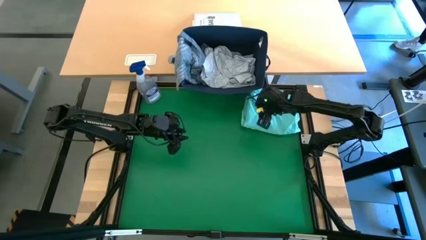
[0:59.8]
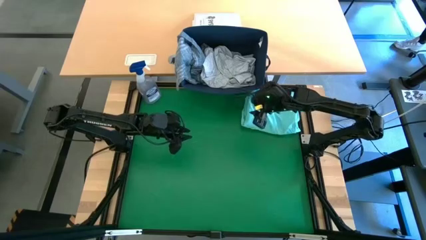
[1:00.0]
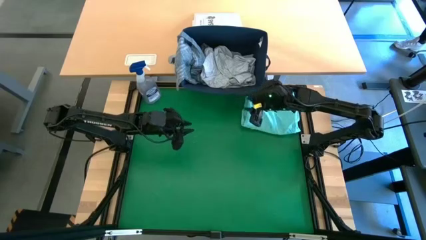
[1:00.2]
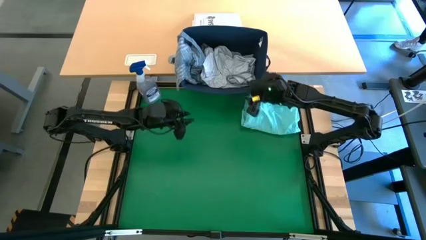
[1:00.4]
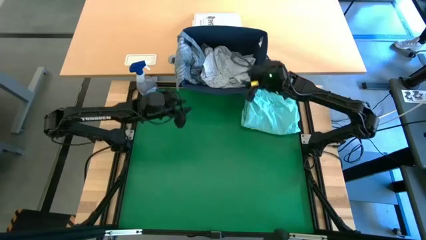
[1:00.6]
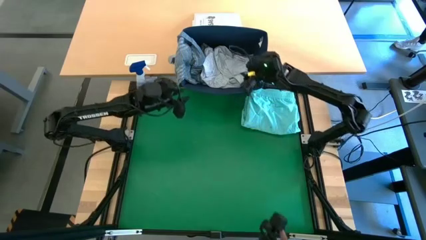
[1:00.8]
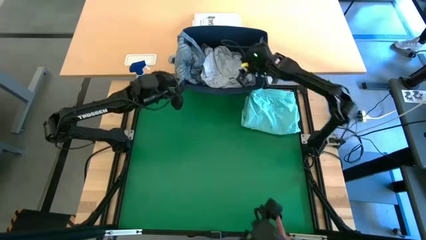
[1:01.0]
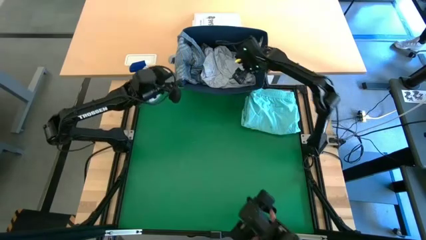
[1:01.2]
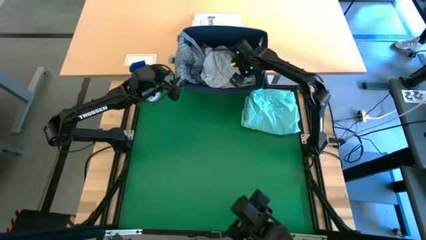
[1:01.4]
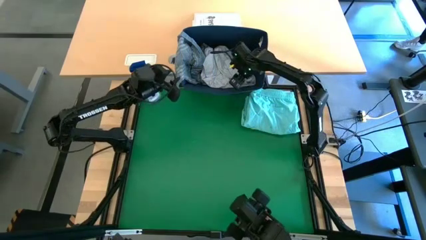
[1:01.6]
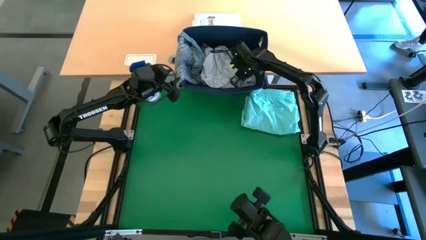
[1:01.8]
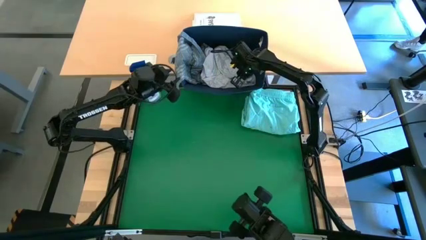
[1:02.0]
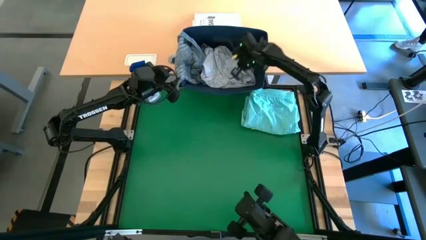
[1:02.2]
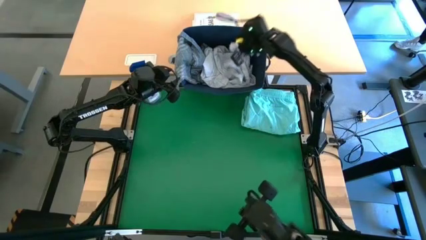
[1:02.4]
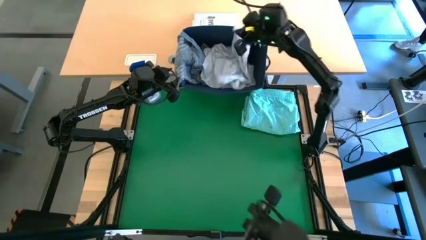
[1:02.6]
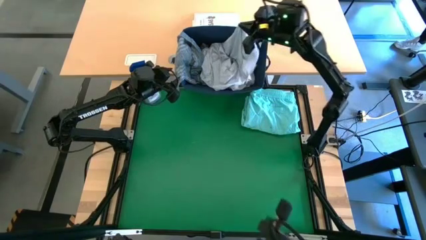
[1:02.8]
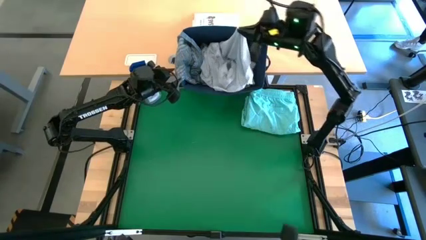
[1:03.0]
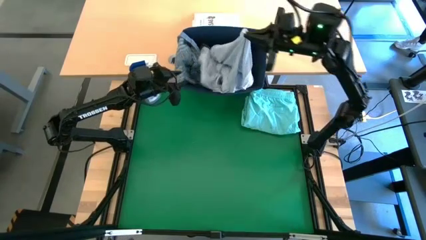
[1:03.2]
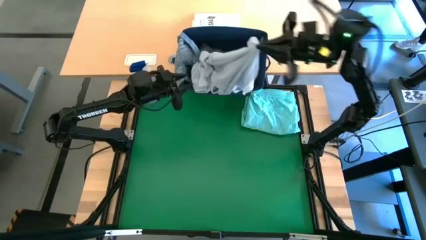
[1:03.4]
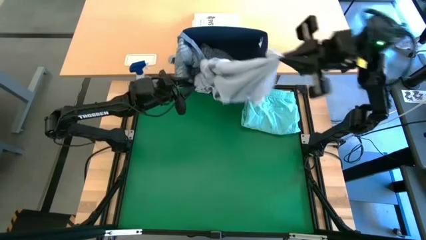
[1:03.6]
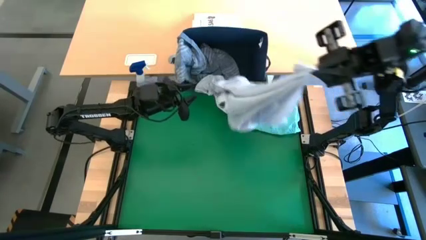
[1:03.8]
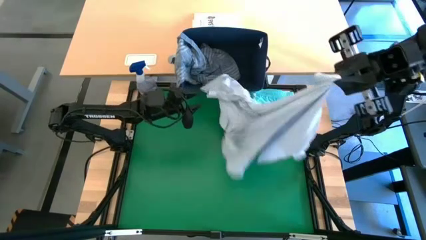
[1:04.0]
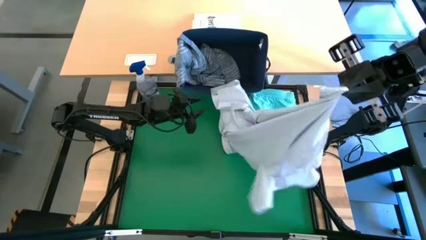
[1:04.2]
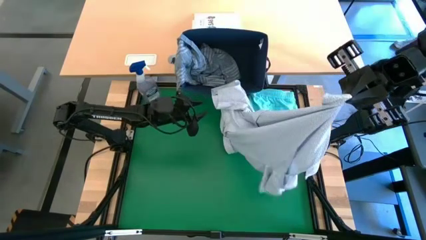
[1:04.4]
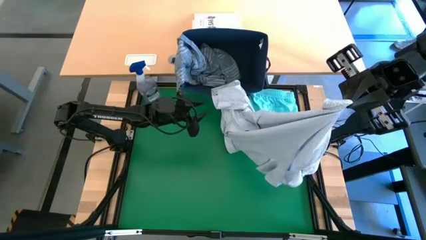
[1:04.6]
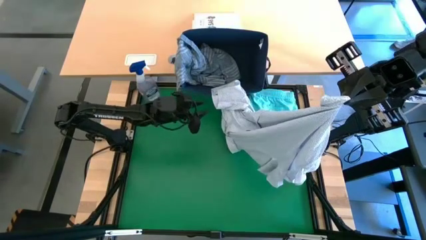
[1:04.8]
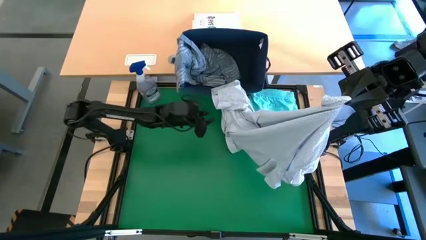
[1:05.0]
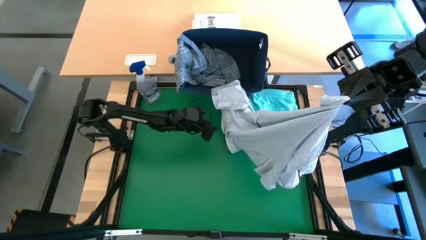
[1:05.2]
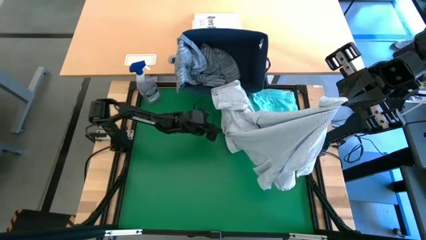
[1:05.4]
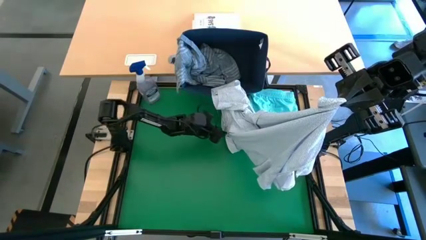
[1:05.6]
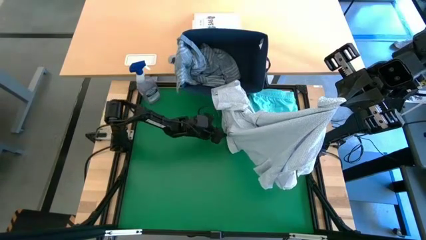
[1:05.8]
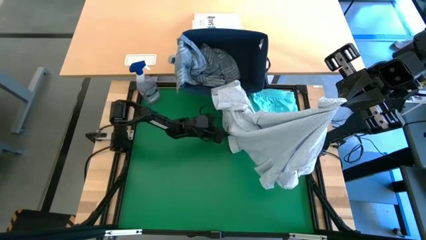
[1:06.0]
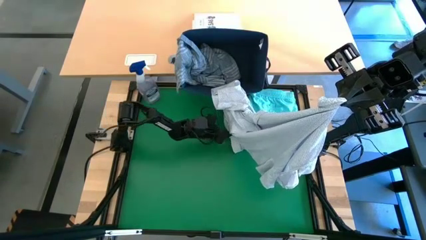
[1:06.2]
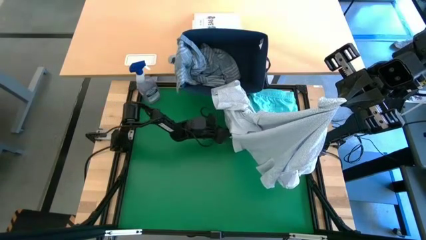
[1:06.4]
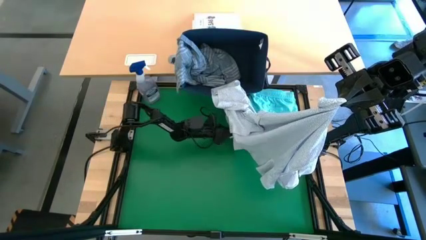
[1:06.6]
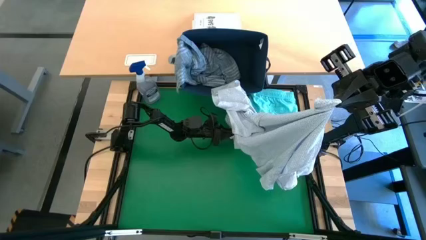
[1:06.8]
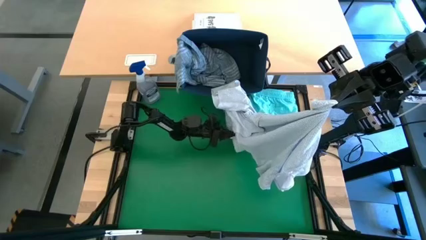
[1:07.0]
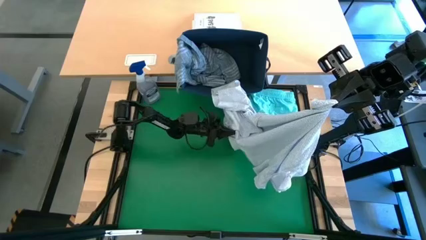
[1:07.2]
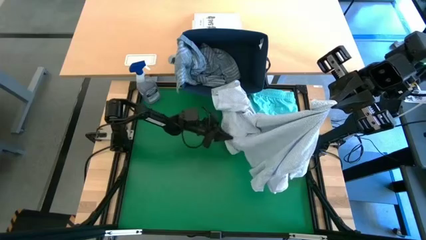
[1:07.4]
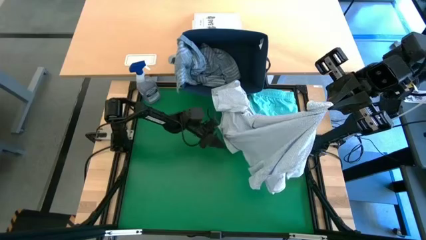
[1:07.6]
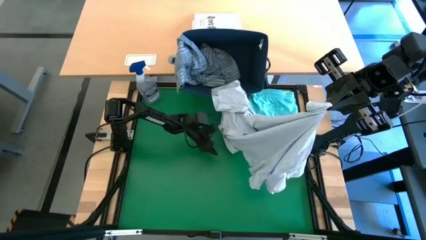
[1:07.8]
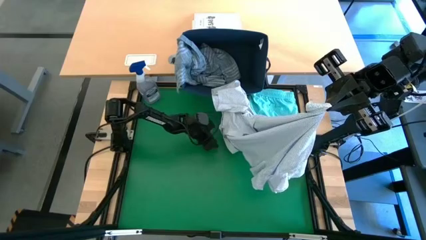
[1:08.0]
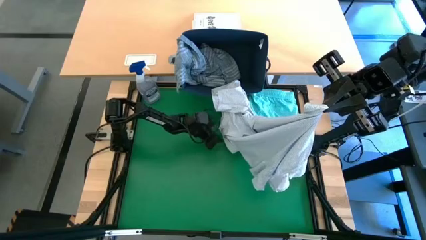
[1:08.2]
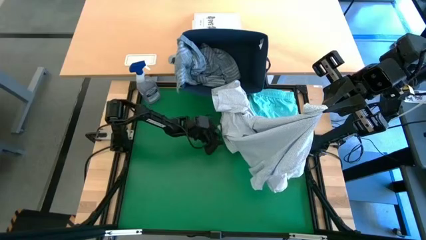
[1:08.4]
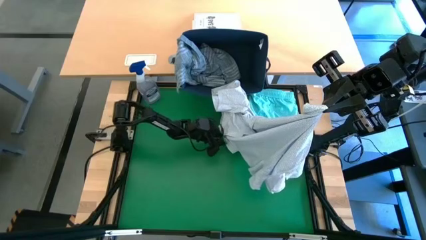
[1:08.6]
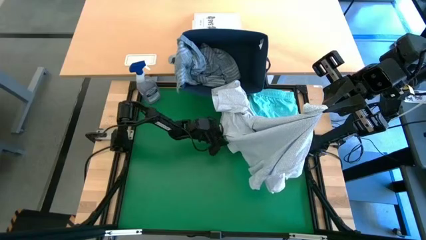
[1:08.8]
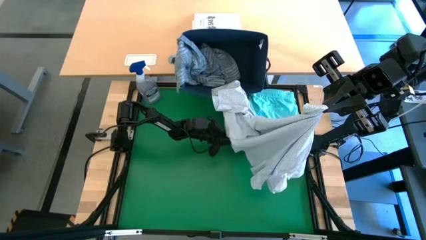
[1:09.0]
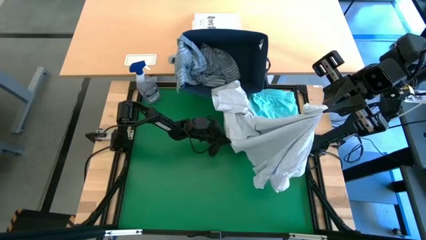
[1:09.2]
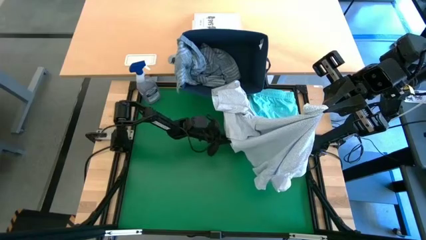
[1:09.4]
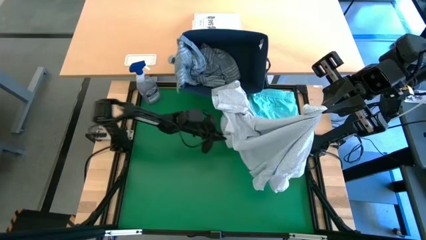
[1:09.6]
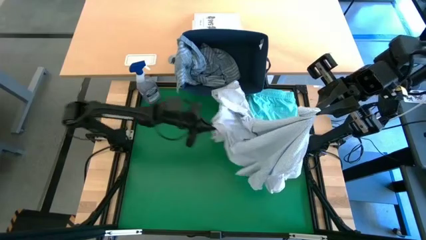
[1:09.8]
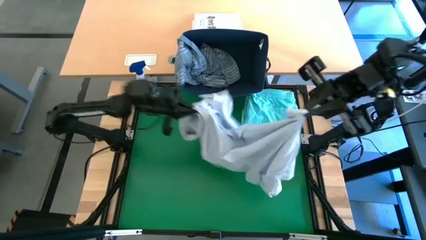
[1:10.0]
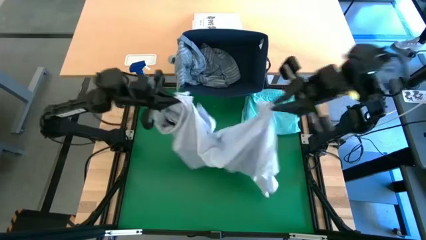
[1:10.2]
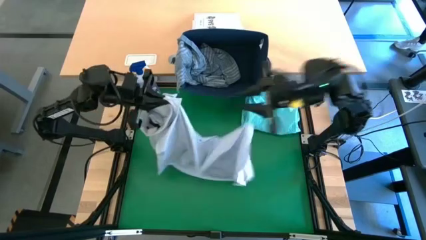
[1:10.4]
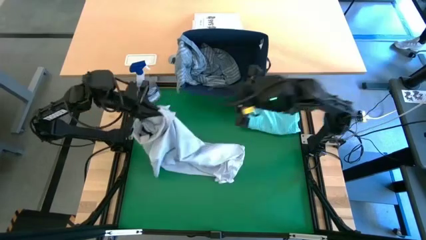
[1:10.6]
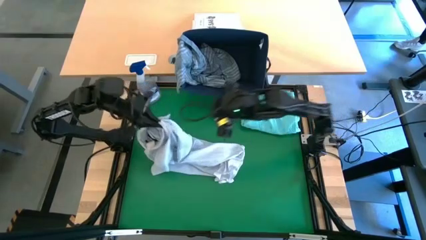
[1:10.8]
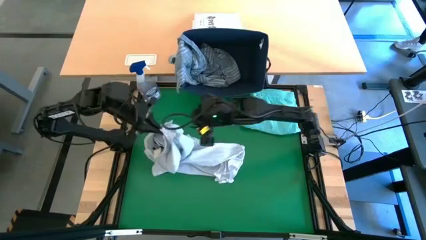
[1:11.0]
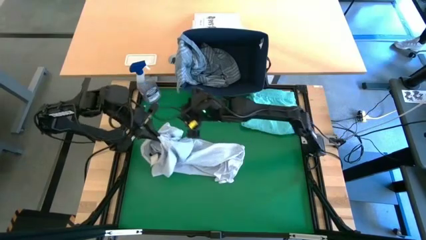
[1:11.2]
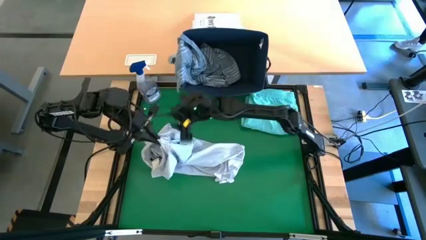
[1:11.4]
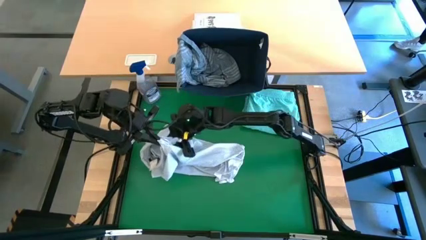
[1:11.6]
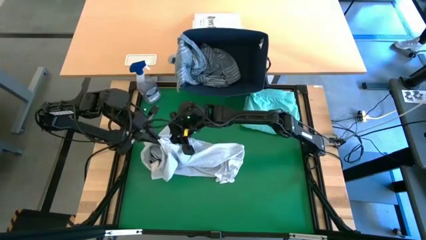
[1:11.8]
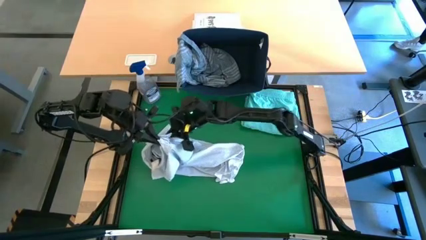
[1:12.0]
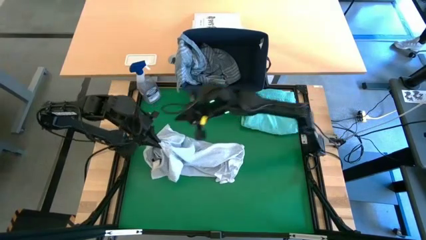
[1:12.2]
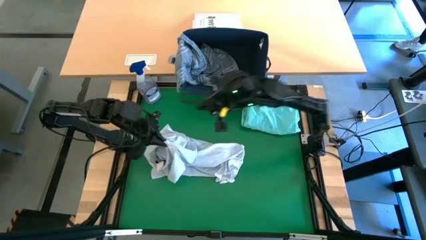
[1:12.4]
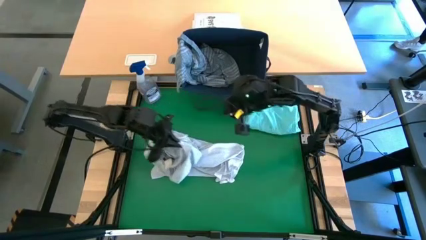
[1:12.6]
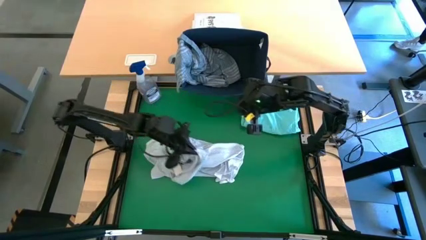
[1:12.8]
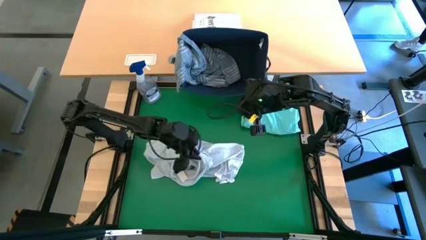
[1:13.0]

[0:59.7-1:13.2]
Task: Fold laundry
Remove the white polo shirt from the blue laundry bin

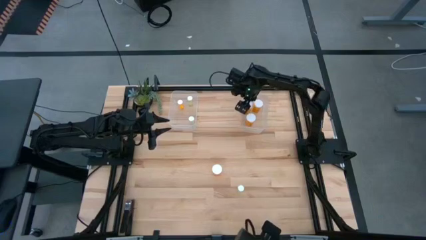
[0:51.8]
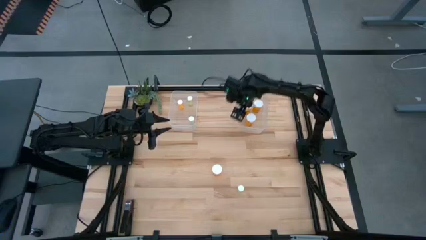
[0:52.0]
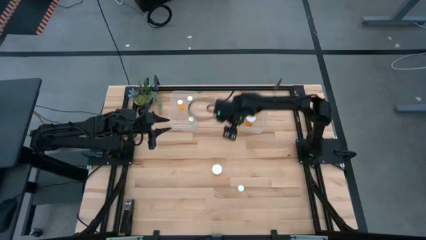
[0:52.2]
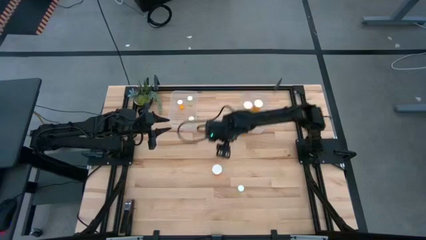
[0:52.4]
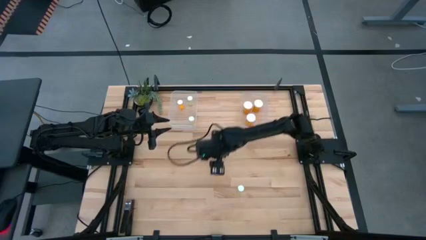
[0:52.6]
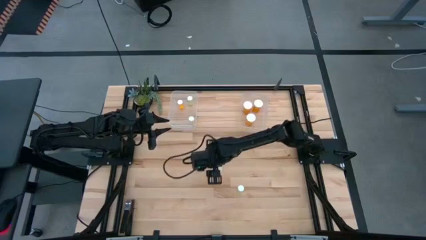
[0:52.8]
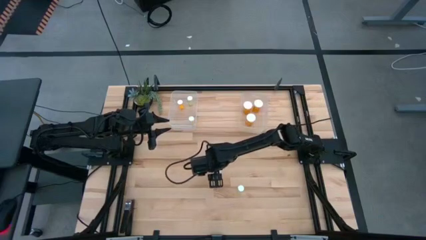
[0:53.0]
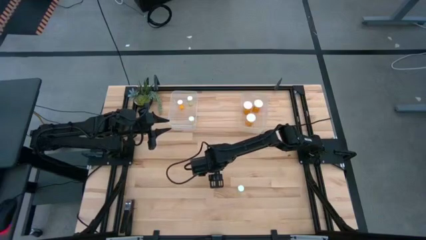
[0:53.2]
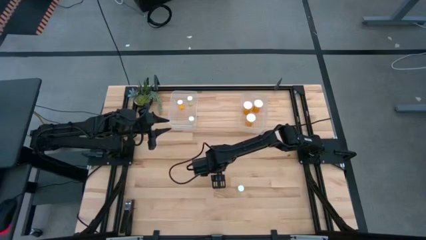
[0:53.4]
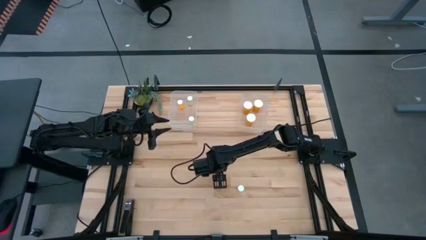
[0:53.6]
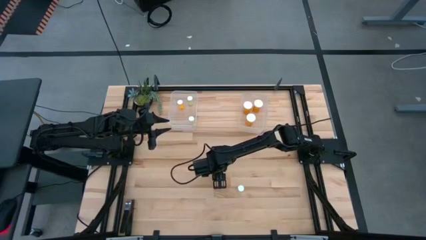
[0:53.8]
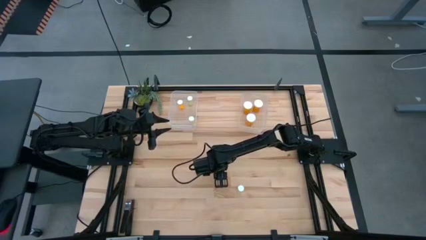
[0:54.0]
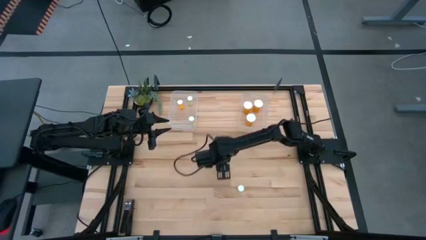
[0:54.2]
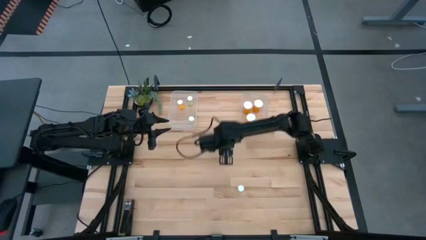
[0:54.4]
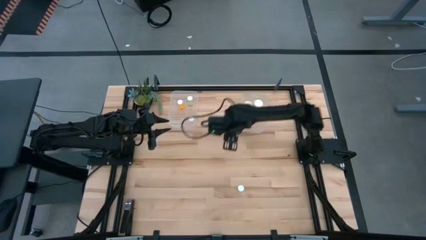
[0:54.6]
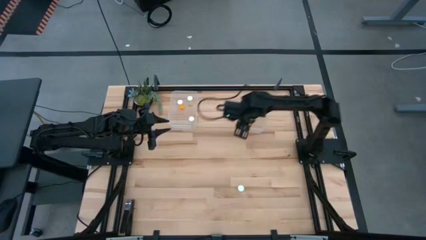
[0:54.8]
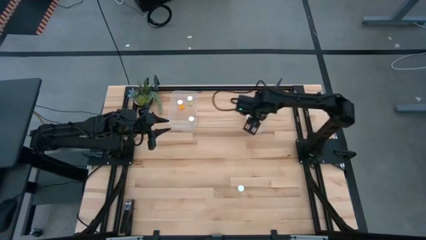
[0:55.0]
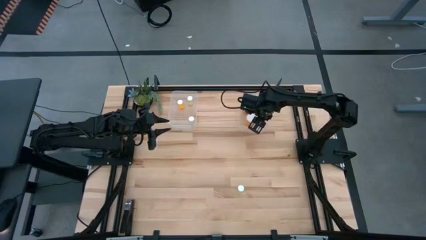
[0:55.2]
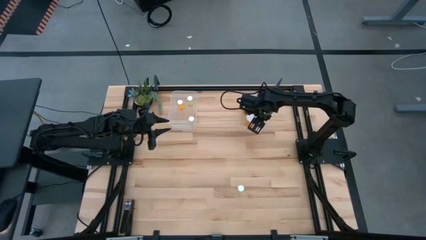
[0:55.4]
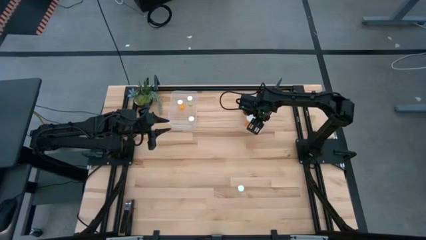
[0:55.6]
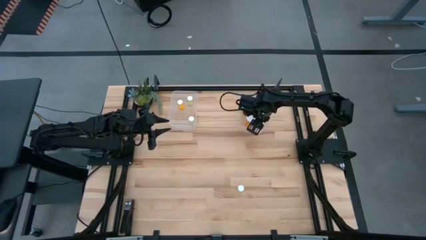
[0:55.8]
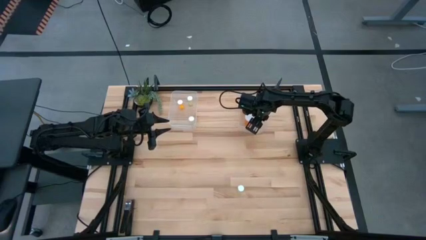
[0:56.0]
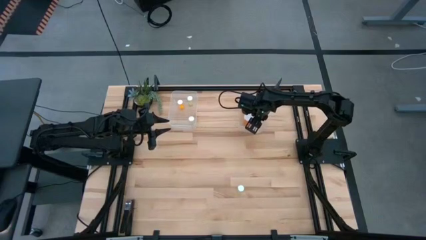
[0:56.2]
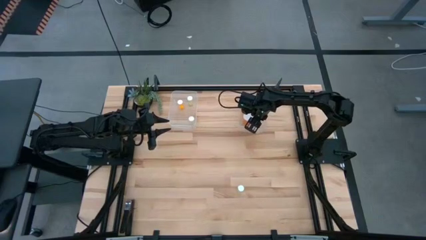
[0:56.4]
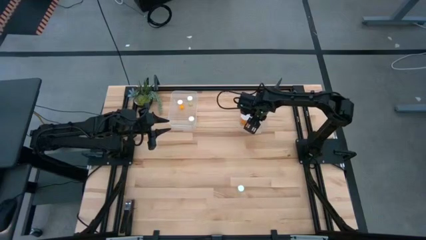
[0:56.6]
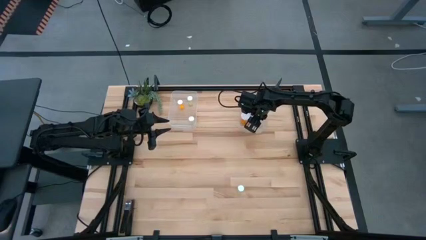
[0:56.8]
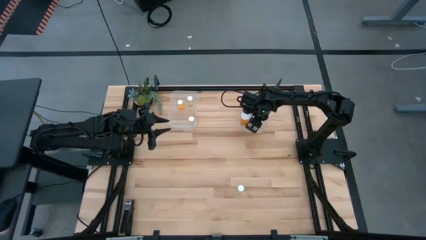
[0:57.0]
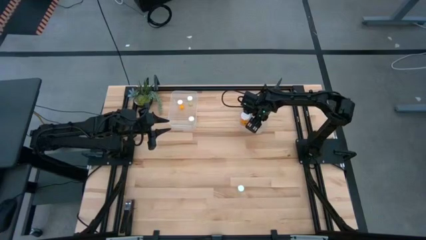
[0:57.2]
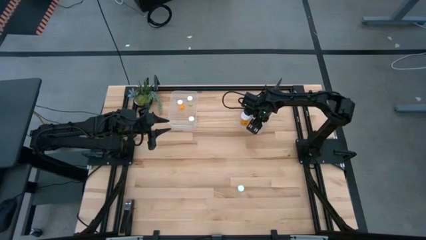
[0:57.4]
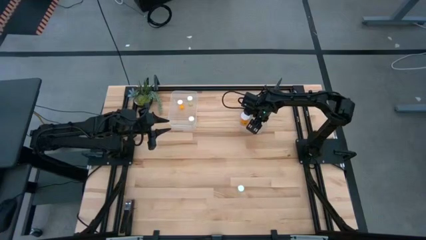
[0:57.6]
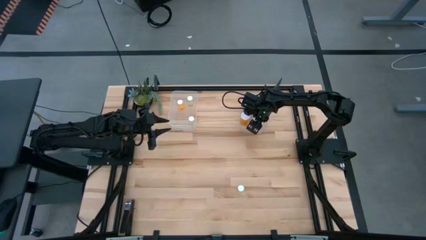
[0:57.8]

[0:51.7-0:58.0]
Task: Pick and place medicine bottles into bin by pill shape (circle, oval)
Put the large orange pill bottle into the right transparent bin
